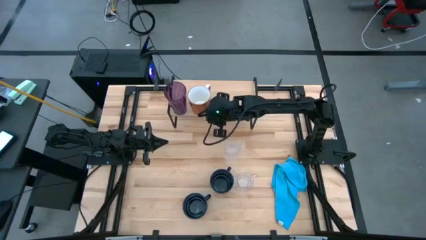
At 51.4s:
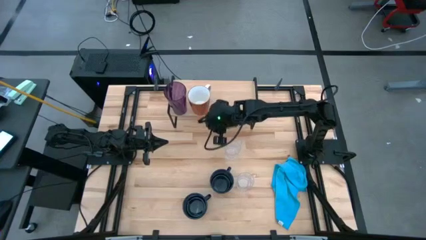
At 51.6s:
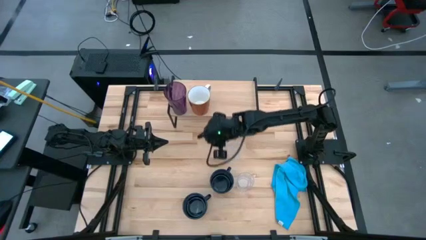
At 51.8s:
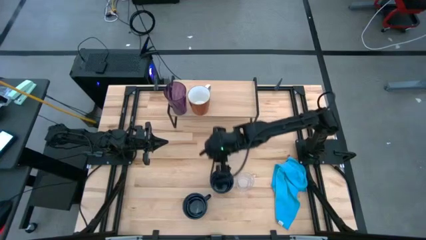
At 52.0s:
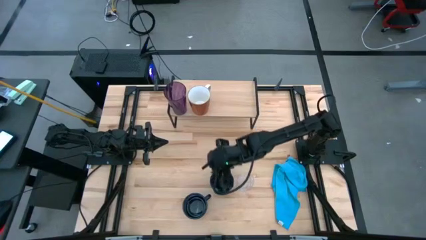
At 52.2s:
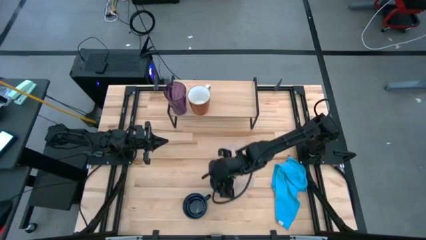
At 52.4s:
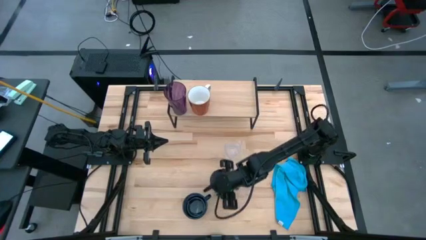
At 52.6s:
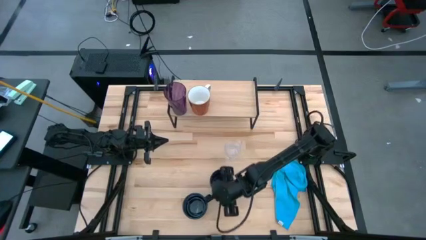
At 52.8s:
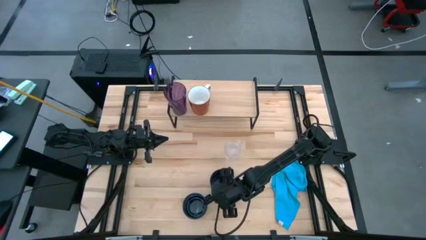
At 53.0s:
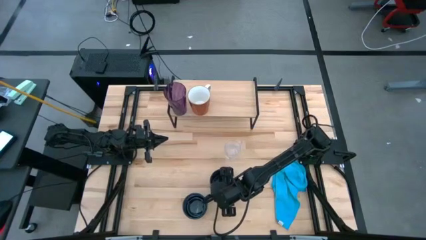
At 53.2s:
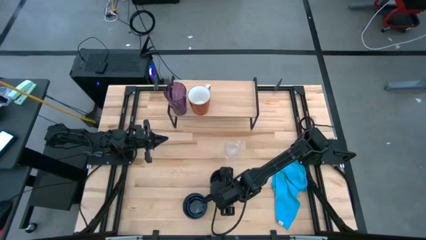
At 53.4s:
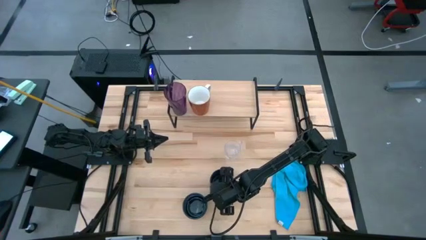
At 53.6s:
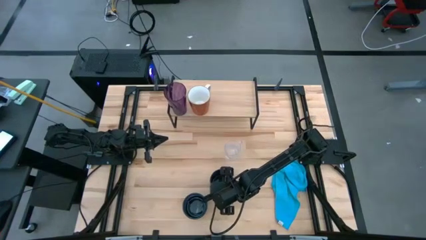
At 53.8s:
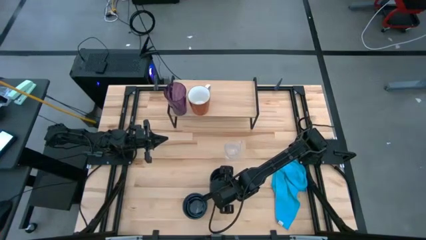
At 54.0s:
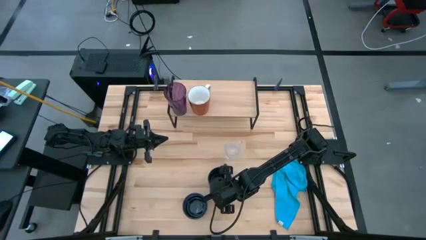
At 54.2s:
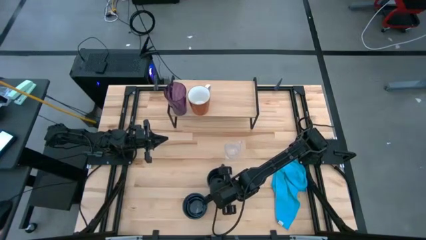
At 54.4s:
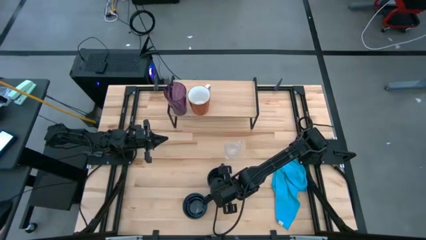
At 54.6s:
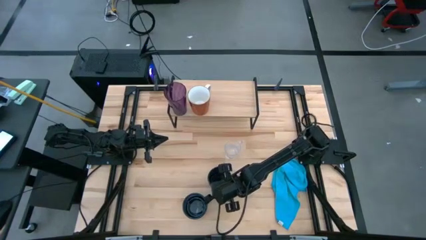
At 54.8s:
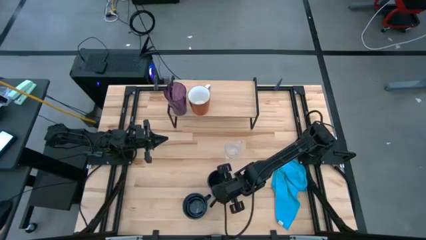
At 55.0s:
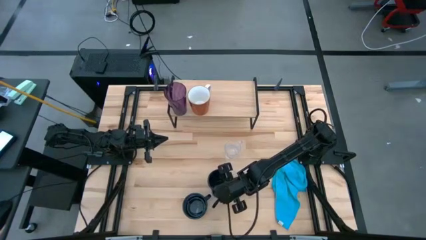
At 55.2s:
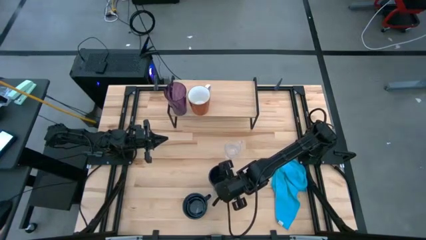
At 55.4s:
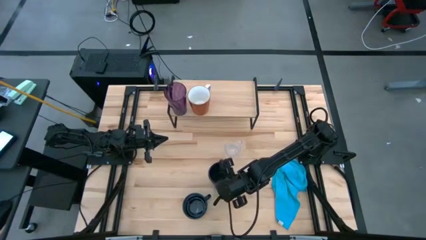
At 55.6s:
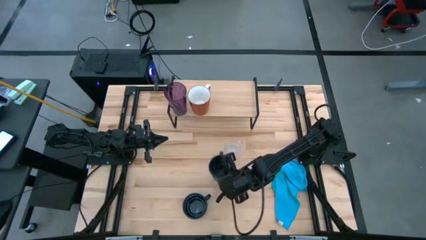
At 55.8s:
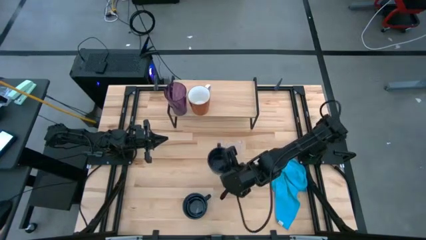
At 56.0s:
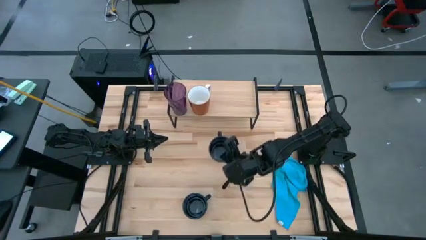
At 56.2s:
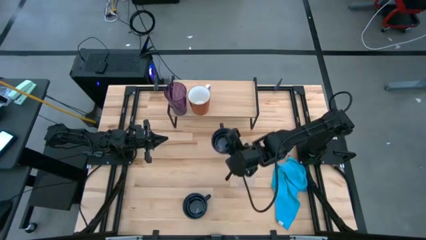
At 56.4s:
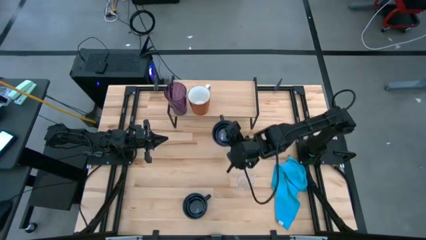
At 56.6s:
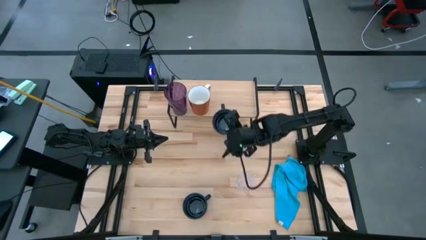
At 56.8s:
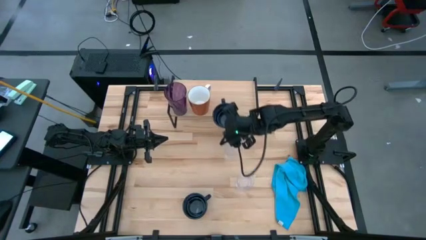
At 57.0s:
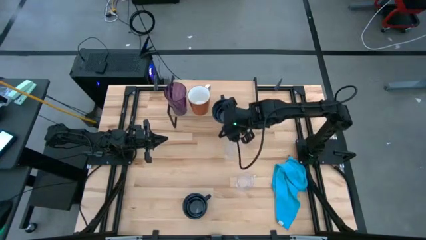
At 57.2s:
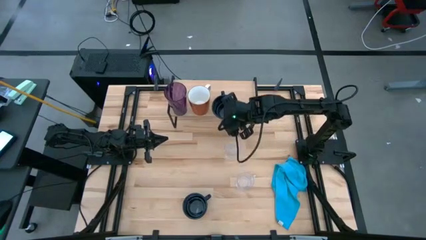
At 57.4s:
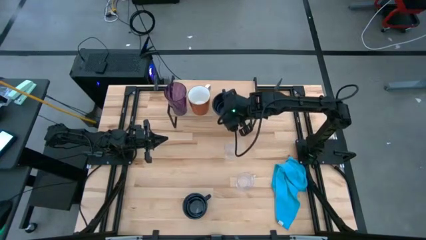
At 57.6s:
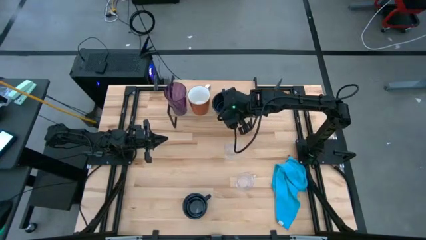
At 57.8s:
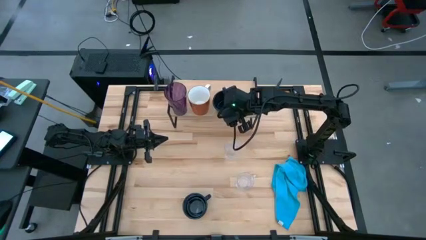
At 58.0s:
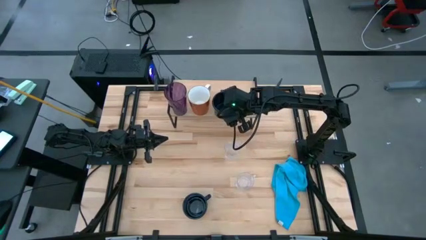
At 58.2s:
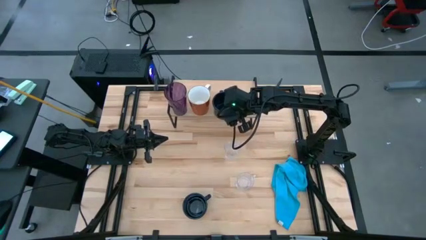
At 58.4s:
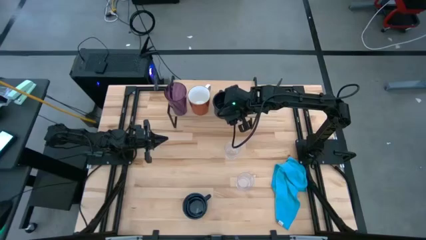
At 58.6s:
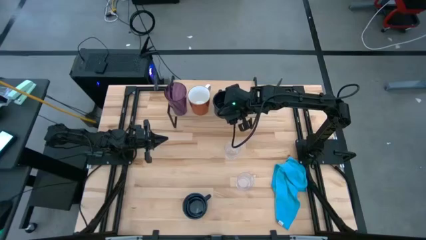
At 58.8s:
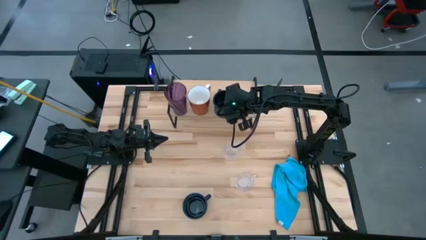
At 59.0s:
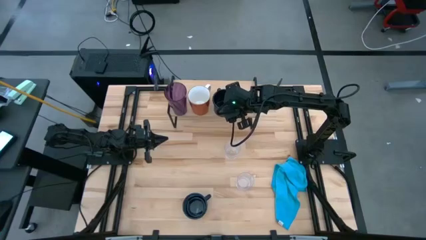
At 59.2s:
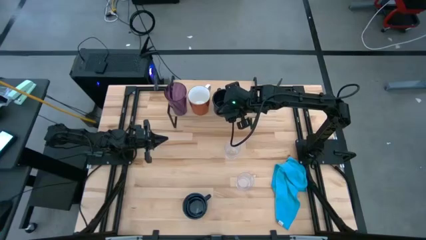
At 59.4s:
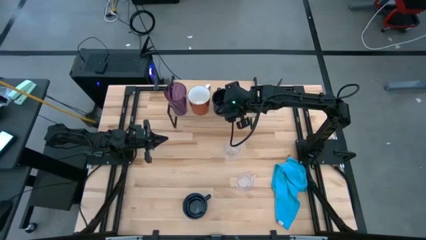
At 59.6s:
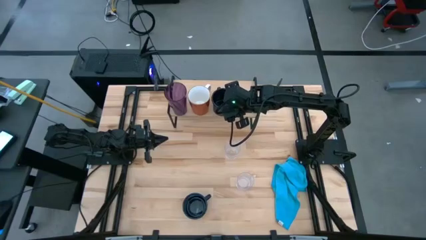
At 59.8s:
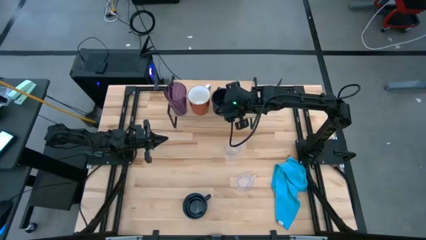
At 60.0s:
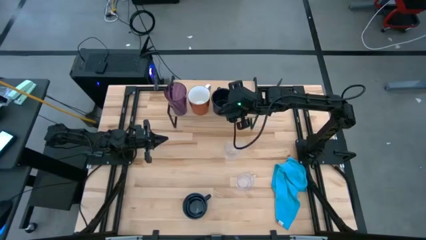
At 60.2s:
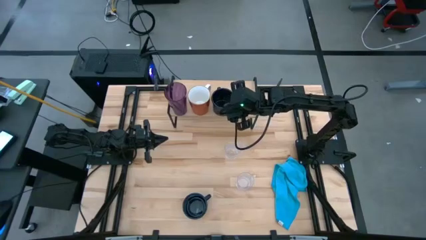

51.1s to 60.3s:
Task: Stack small to large cups/mugs on shelf
Put the top black mug on the shelf

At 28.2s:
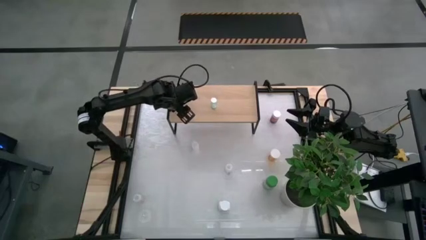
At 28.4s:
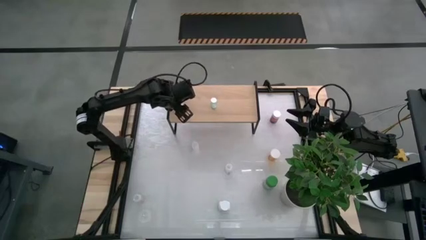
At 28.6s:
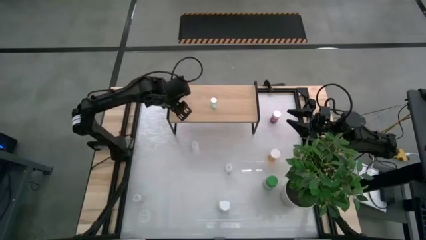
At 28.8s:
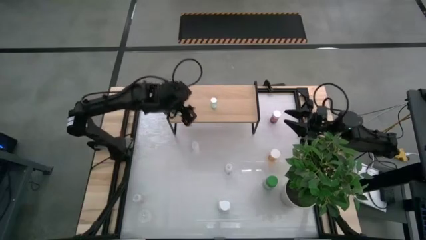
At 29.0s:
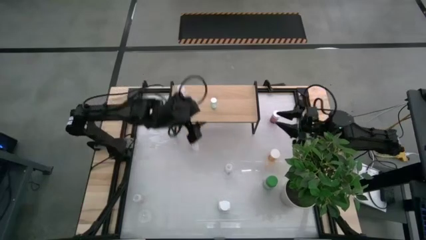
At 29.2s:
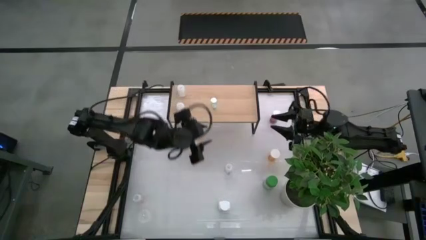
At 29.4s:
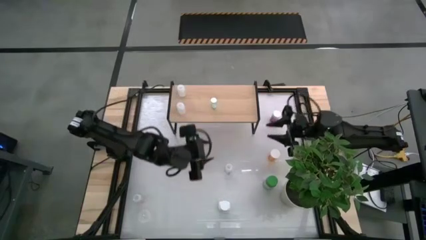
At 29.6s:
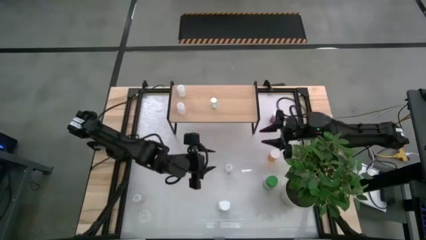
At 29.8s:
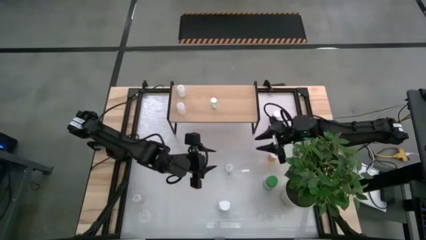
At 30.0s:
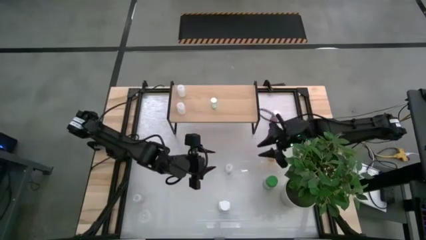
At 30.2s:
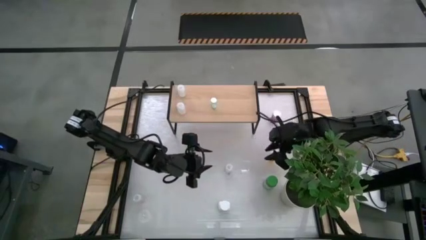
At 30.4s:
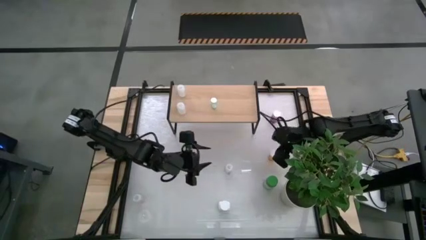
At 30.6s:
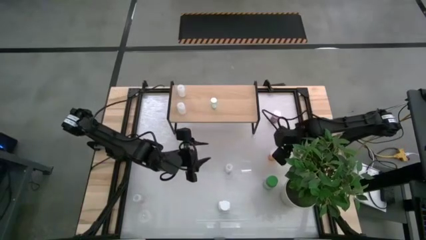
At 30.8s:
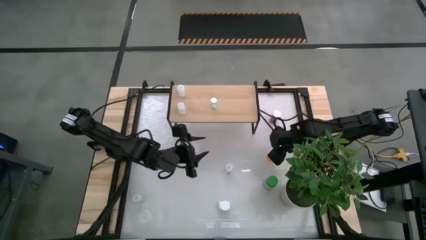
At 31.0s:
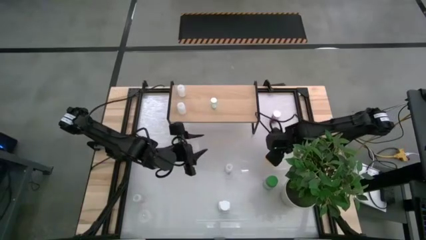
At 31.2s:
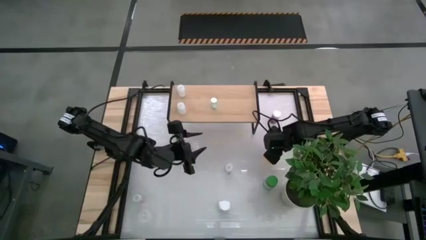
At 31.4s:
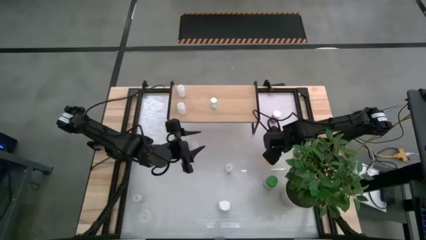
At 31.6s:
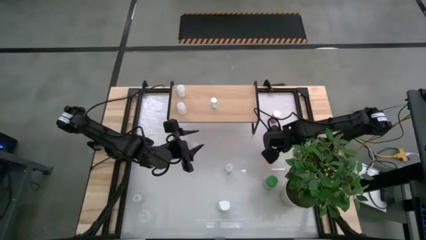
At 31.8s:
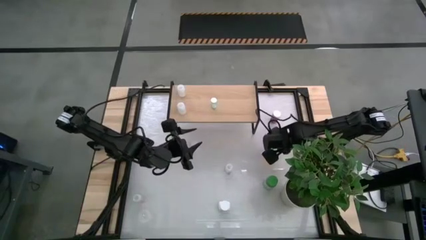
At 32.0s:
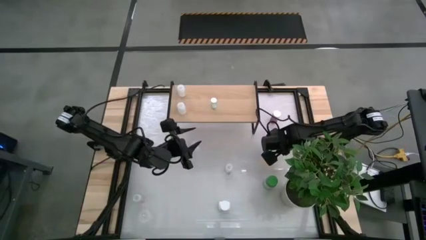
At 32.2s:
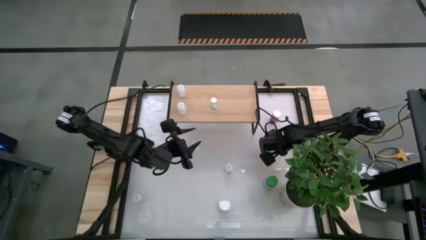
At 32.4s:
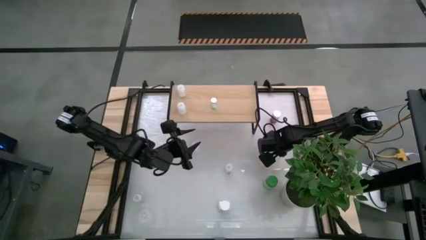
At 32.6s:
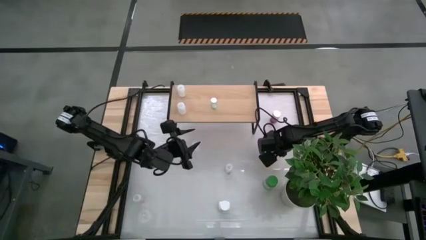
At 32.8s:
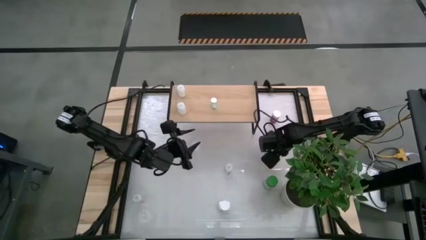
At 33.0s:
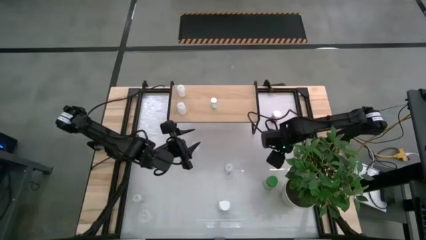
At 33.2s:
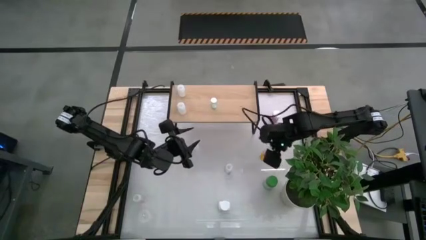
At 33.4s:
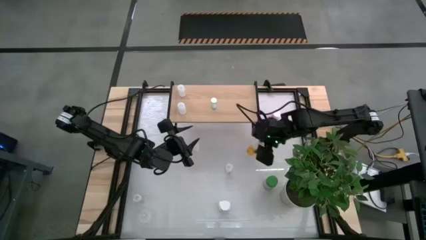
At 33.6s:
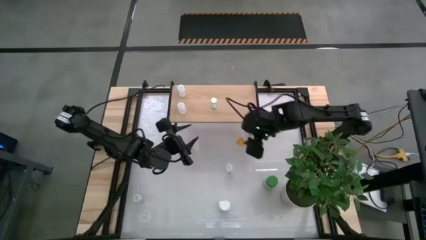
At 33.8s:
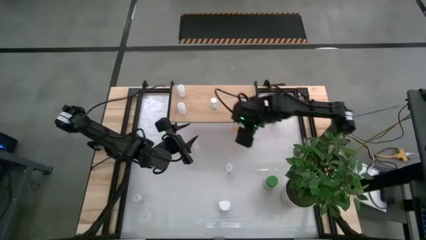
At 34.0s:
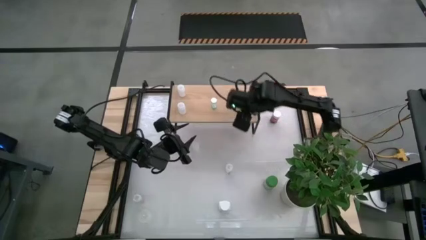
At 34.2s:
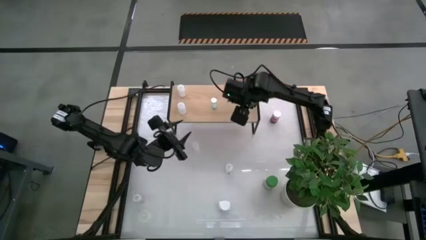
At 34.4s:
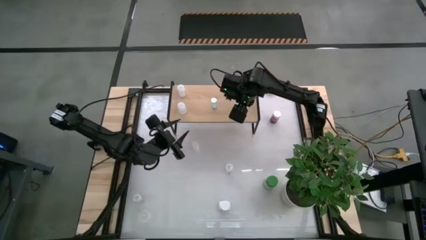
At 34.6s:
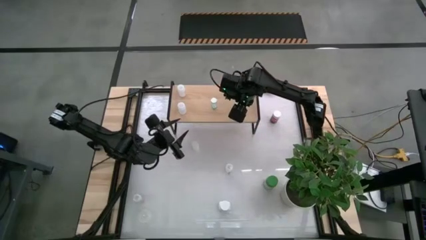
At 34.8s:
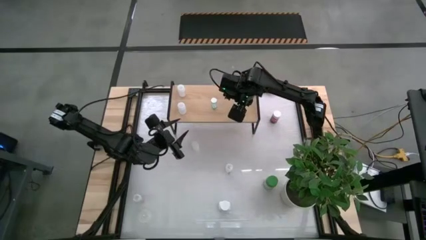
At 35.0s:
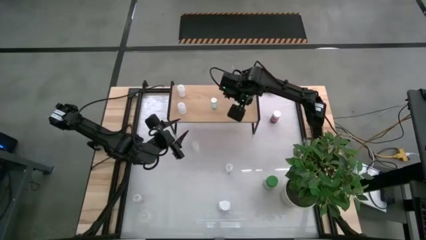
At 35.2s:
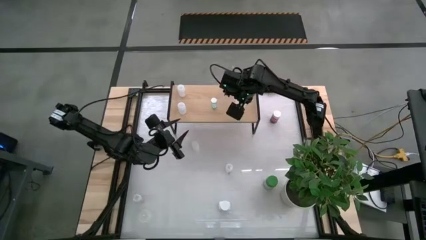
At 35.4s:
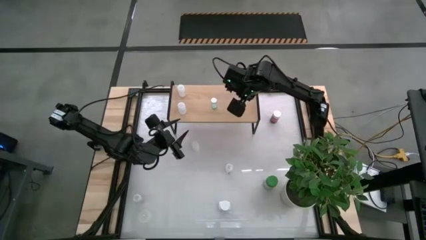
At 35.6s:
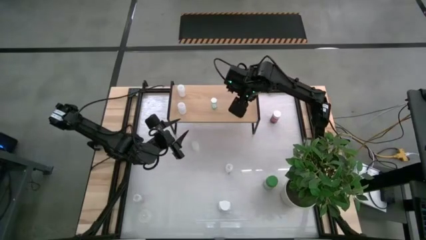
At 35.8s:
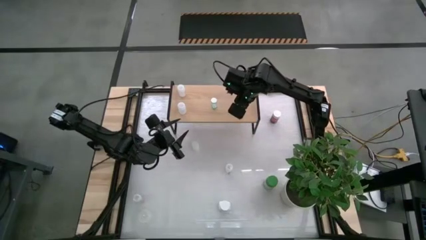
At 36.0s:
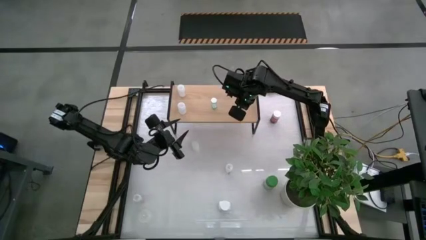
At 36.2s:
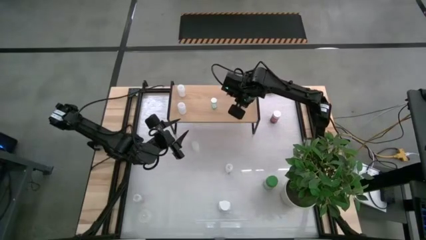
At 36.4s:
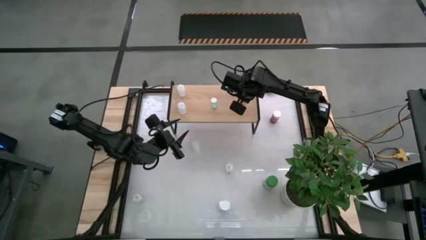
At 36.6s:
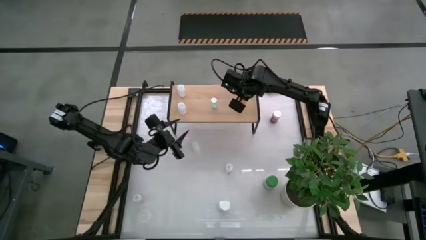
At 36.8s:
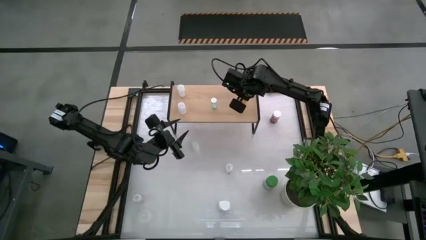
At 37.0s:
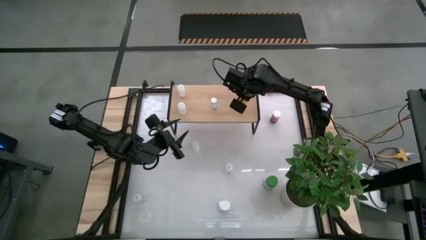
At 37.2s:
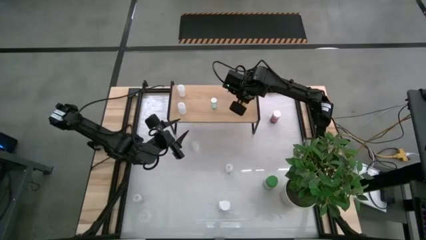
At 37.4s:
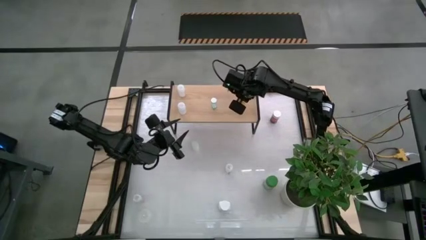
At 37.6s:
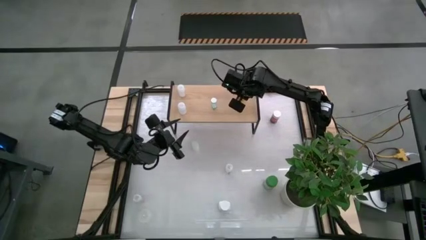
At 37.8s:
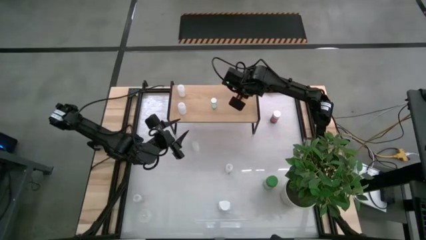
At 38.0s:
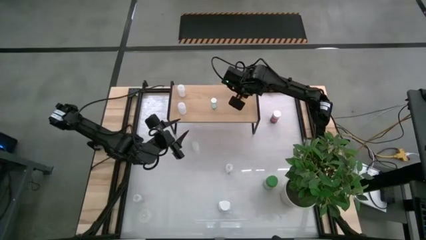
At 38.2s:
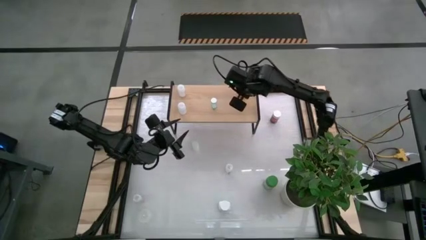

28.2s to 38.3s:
Task: Pick and place medicine bottles onto shelf by color
Put the orange pill bottle on the shelf
